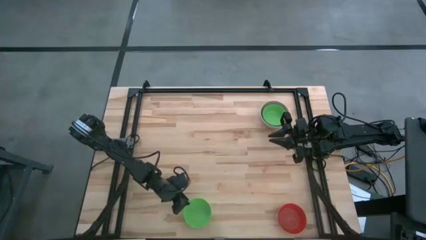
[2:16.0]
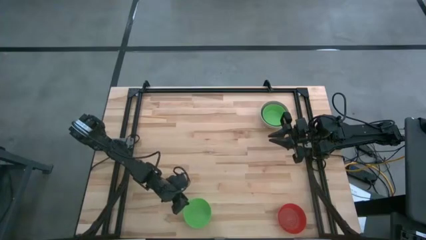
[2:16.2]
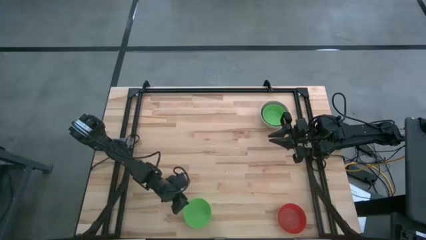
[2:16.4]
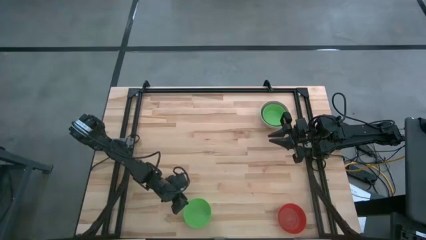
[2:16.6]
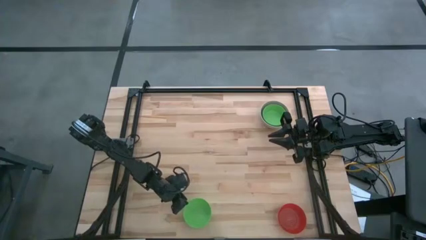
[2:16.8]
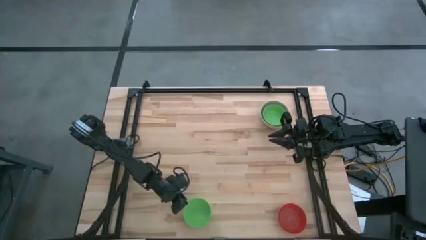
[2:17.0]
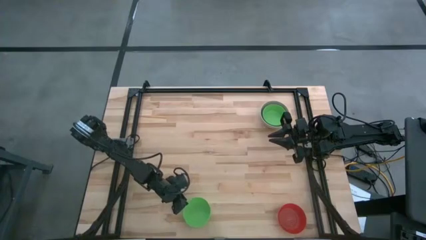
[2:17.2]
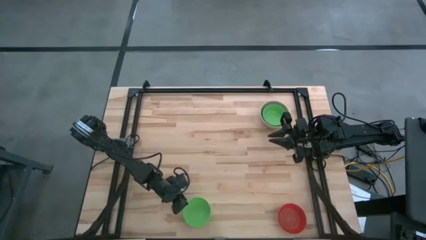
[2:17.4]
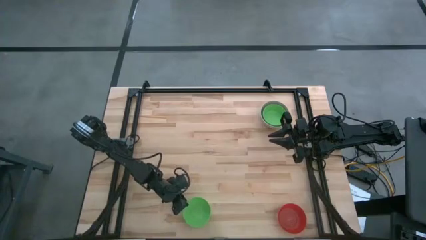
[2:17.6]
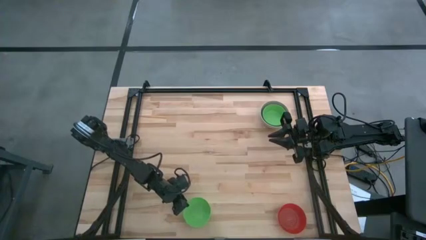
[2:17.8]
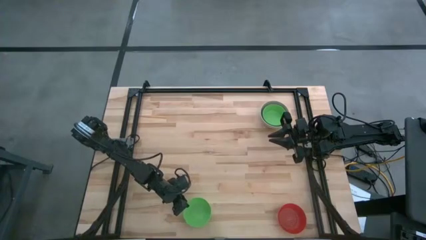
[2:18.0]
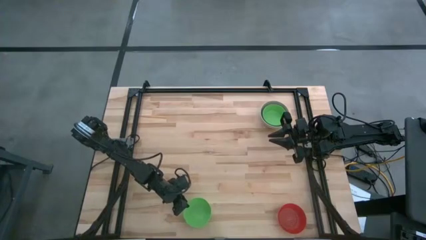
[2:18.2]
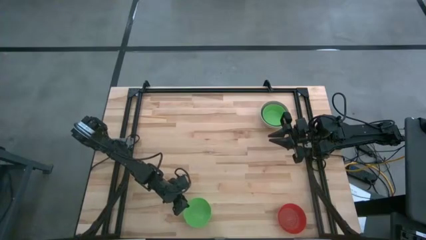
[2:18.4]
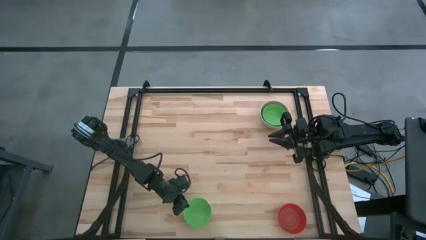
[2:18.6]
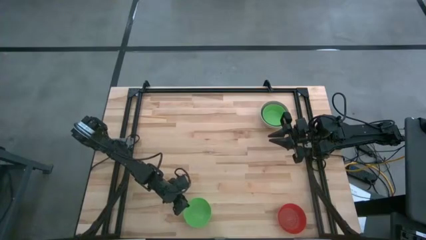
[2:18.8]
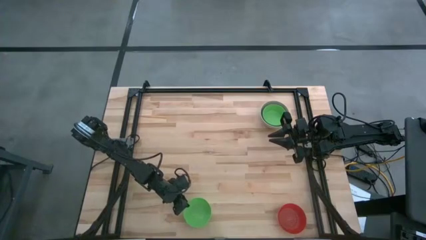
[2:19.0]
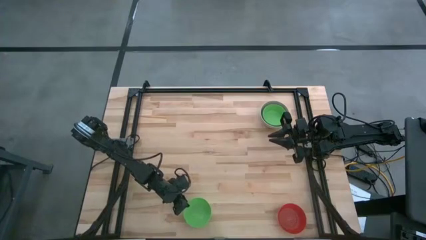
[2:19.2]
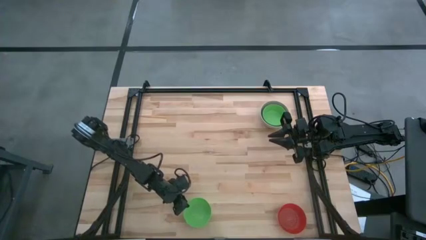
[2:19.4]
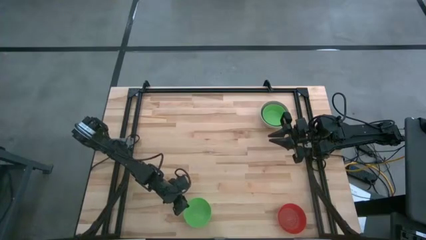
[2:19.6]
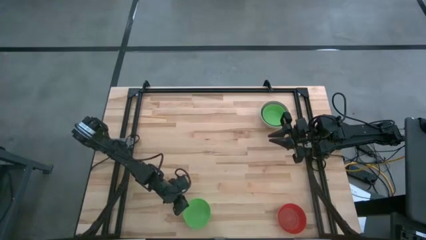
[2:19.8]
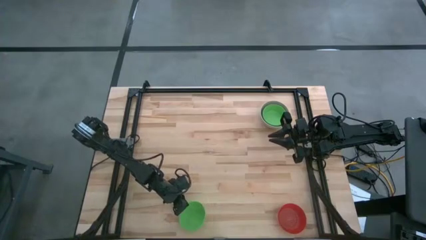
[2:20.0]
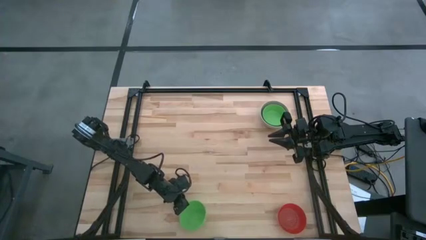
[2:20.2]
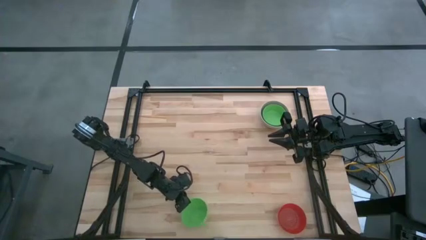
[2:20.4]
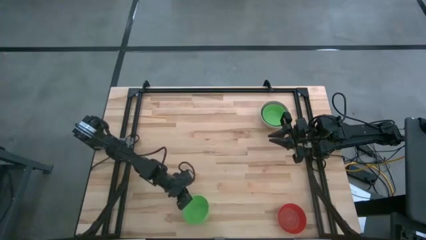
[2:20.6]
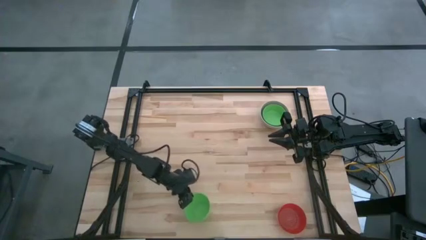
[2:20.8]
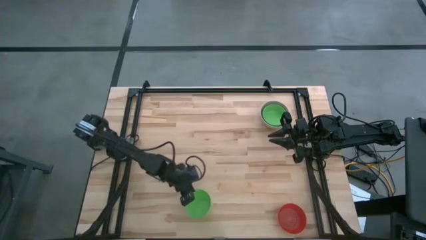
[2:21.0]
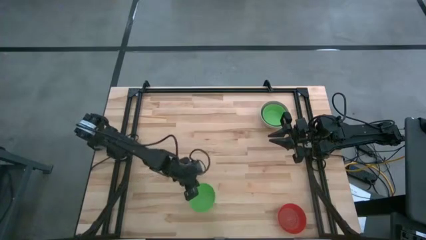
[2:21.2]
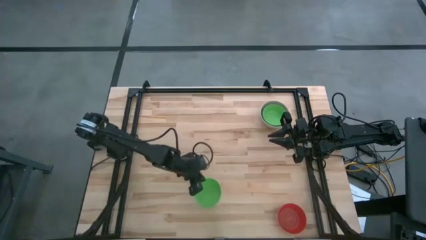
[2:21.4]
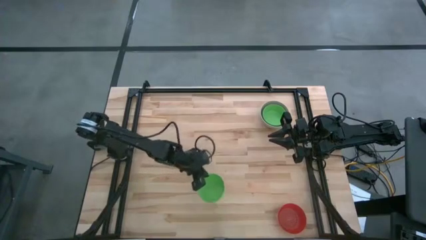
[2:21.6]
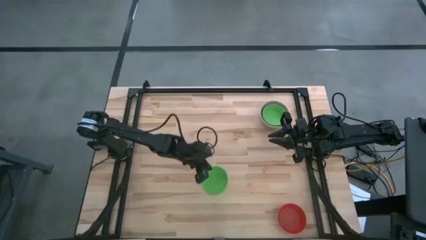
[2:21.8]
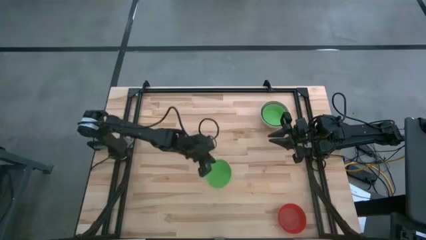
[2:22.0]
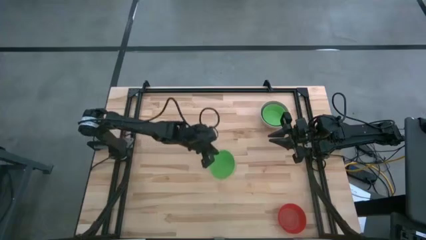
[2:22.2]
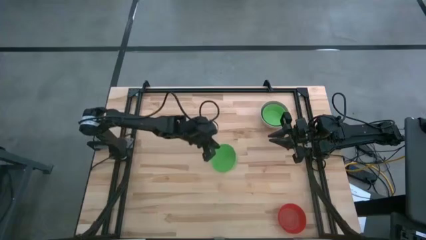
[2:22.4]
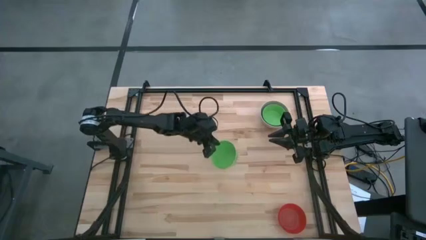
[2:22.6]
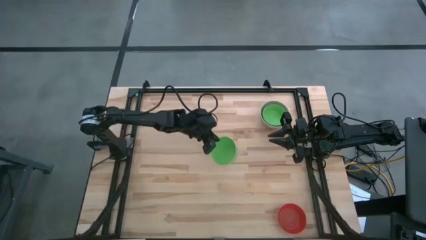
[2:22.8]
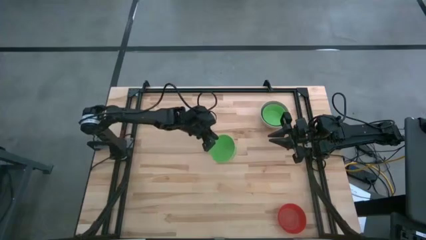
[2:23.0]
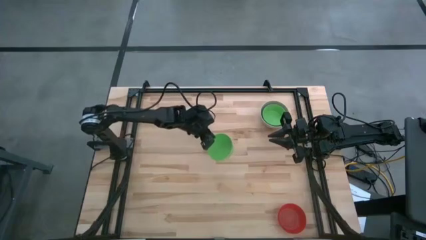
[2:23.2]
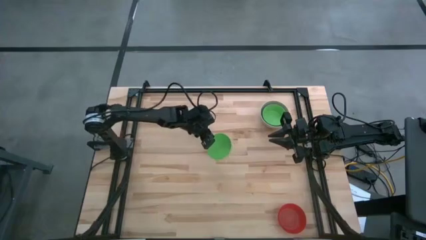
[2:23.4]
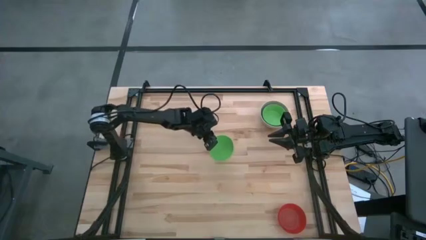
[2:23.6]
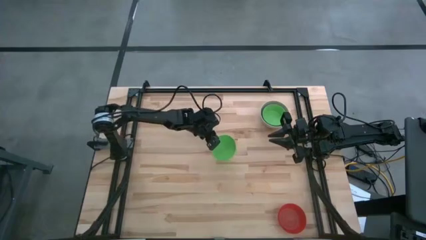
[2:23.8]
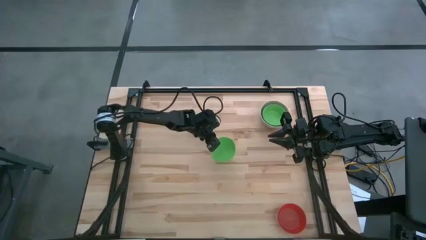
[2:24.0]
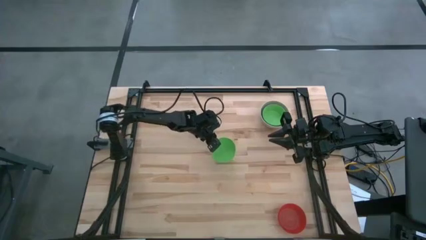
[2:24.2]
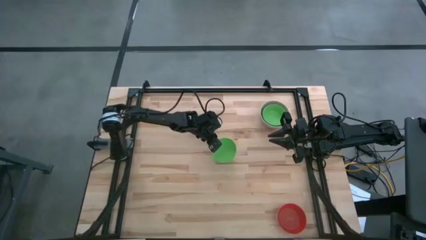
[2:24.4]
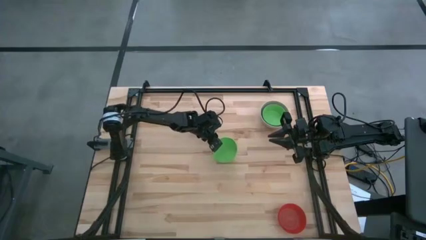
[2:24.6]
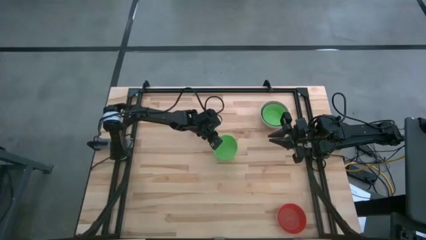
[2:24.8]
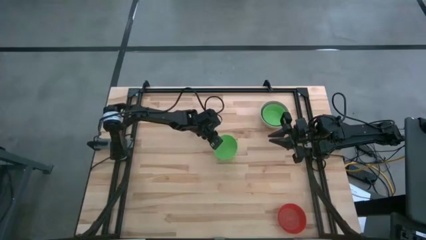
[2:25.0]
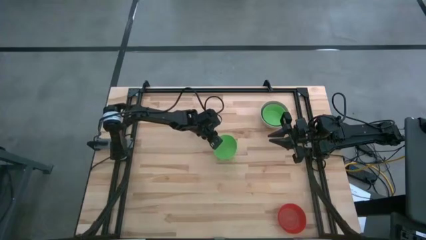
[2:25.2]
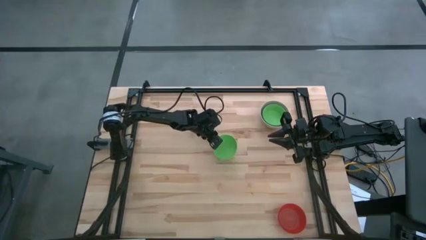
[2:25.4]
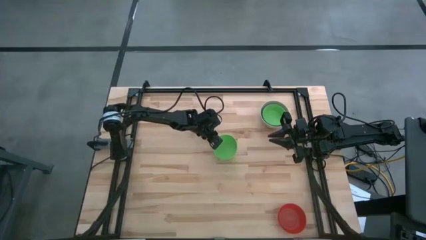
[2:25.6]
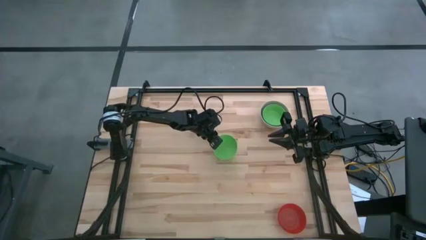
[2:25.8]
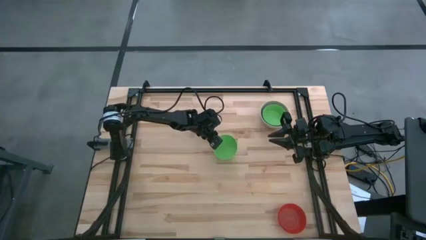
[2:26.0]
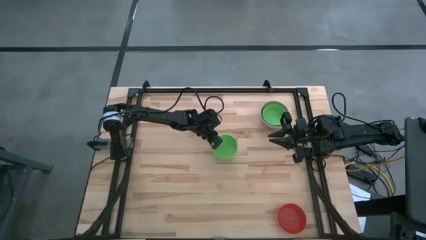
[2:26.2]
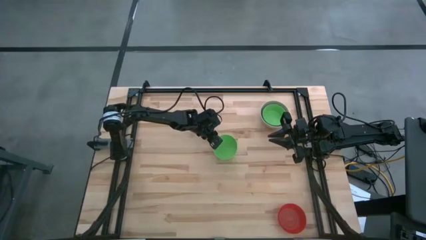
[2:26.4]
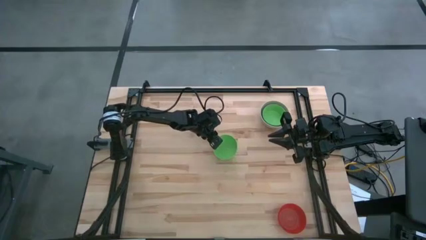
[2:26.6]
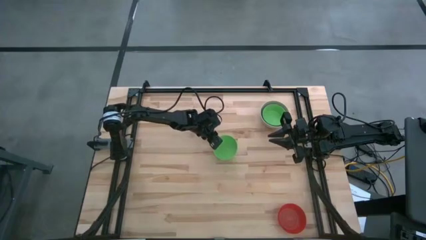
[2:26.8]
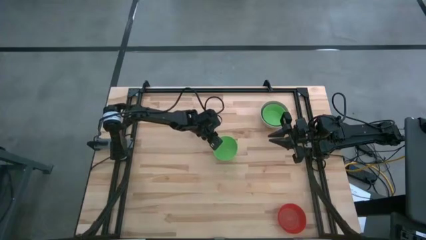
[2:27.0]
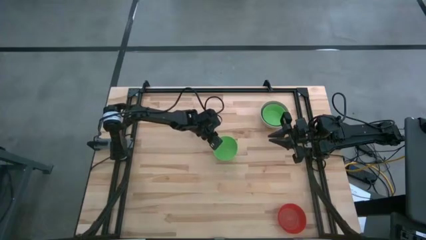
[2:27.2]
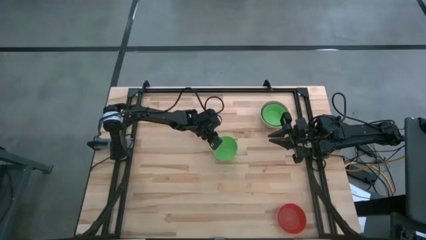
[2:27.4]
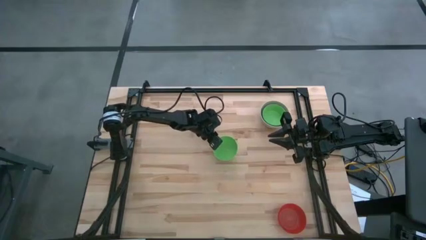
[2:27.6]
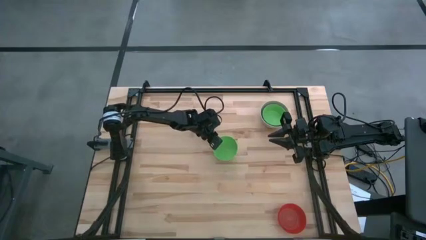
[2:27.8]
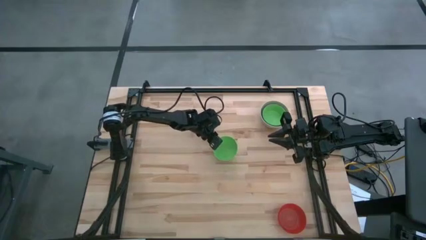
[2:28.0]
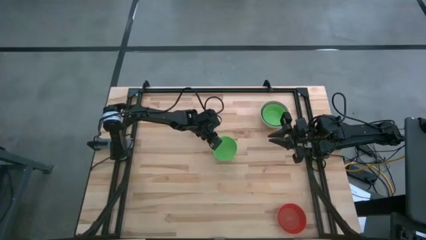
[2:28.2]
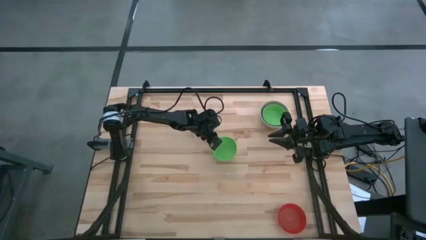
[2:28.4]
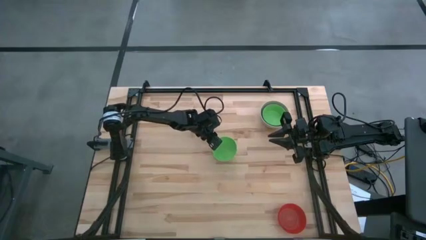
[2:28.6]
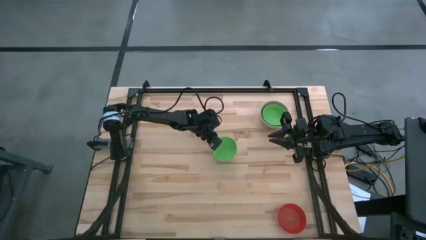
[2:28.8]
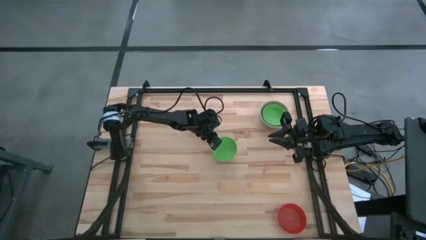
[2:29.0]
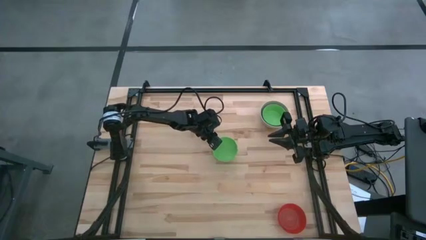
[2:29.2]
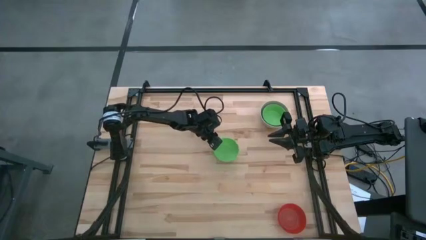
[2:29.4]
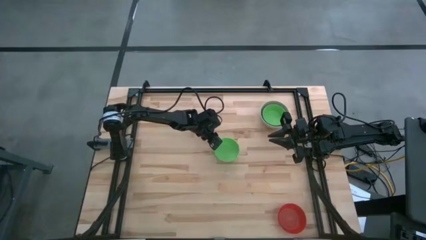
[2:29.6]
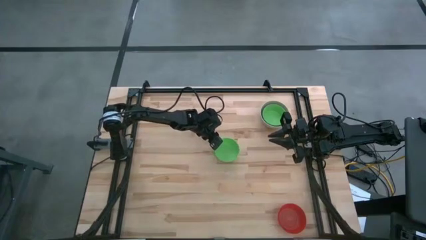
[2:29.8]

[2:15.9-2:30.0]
Stack the green bowl on top of the green bowl

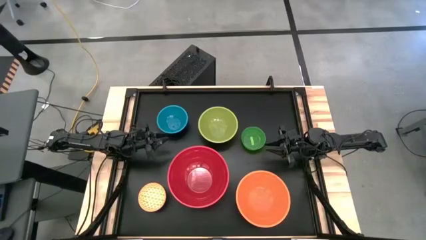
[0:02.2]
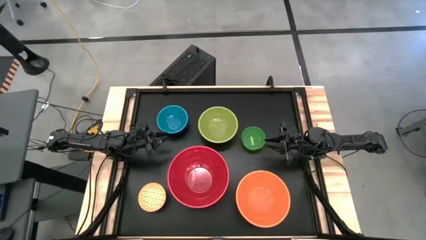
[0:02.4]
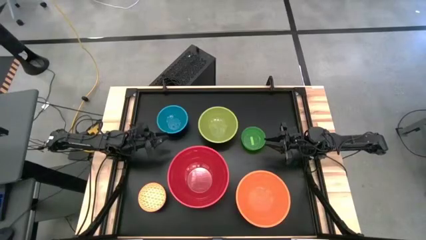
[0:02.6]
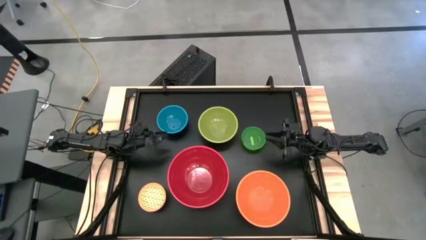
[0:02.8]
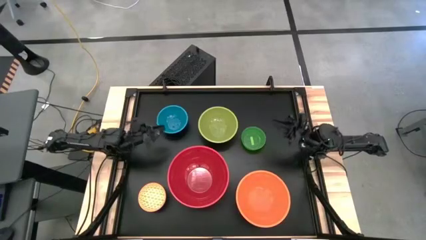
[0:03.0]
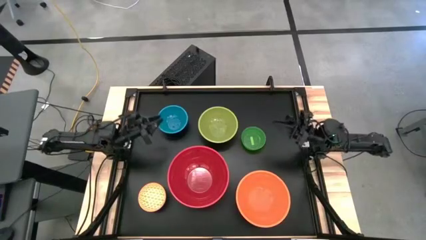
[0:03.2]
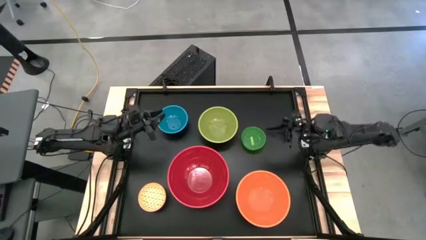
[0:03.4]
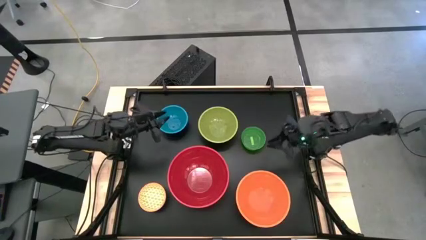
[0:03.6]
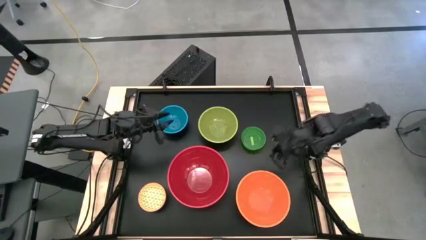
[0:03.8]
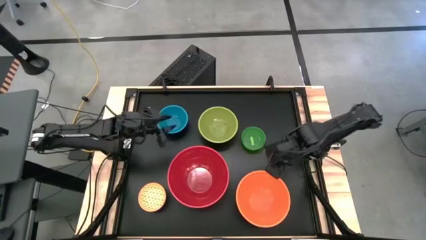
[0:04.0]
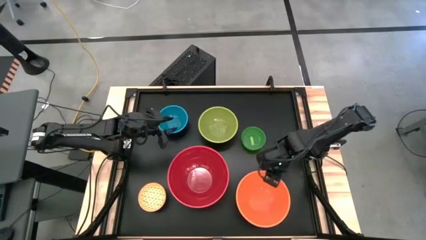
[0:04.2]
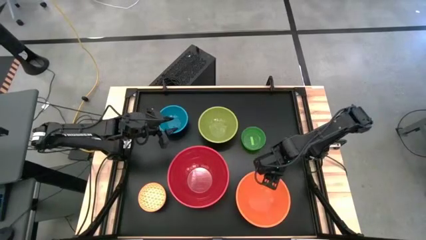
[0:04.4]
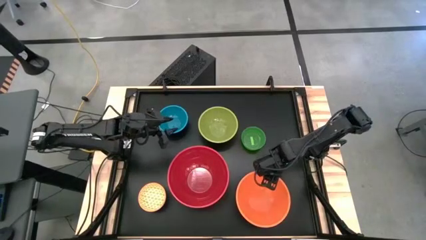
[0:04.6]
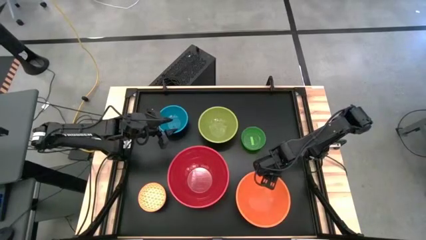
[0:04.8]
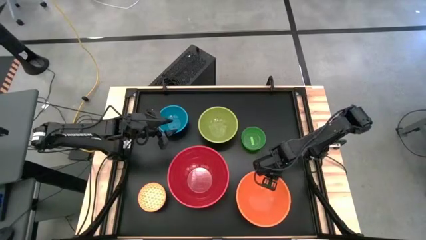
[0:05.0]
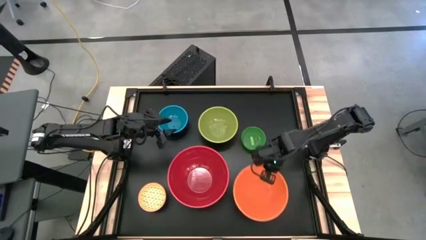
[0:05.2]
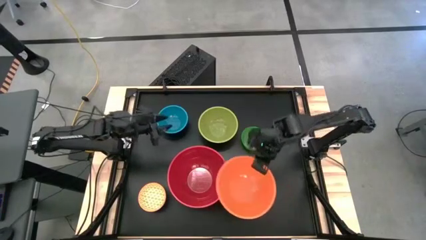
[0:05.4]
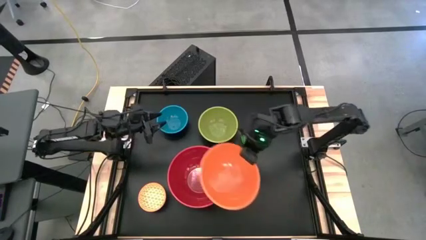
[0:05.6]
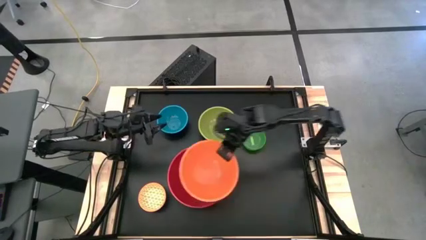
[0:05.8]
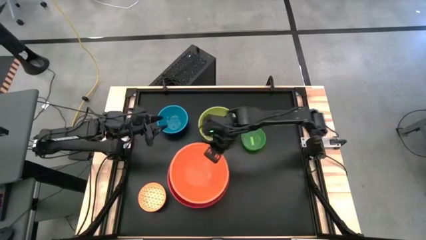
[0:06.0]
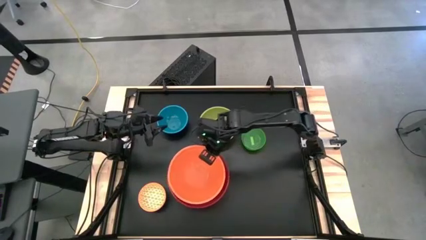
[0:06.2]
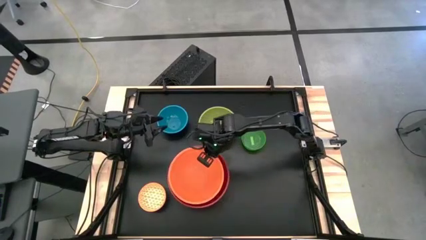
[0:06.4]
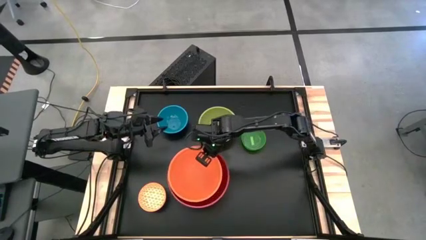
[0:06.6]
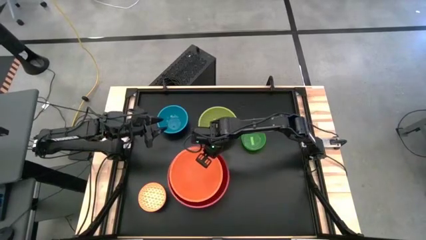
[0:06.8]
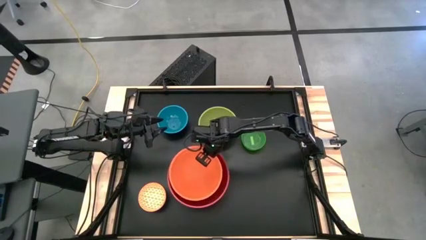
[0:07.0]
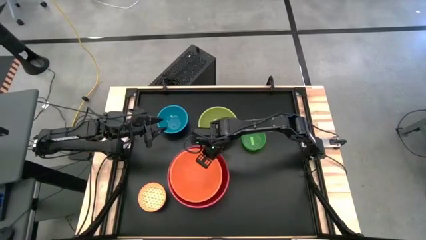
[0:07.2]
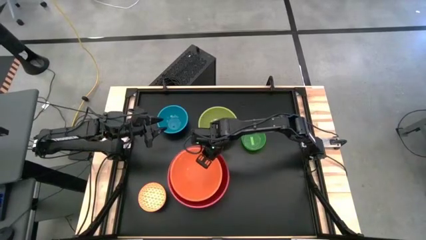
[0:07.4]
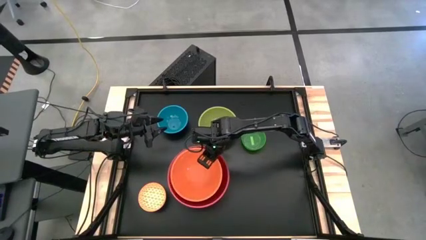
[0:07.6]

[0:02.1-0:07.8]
Stack the orange bowl on top of the red bowl
